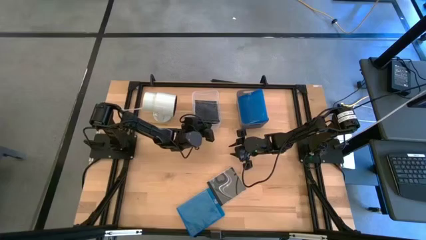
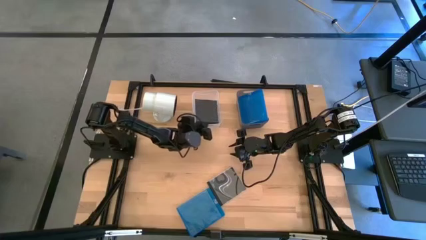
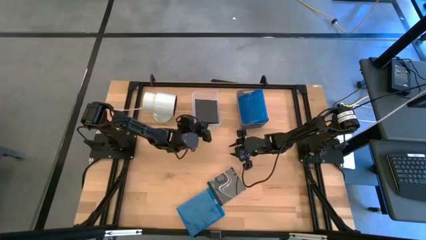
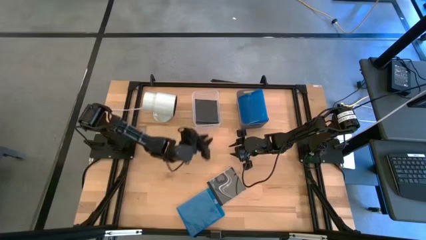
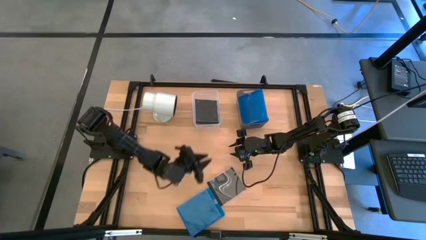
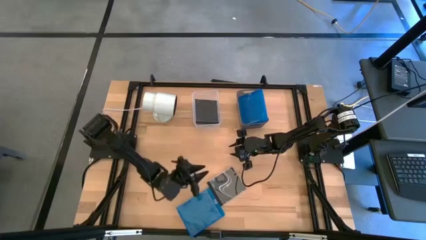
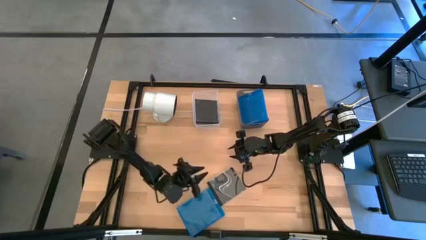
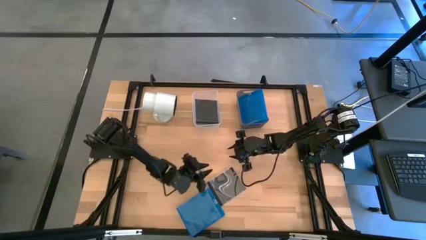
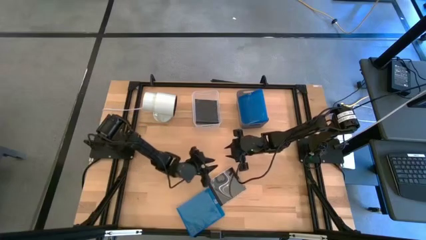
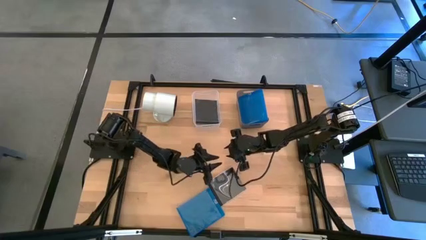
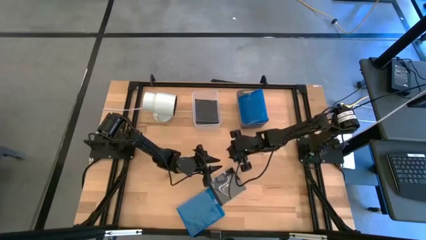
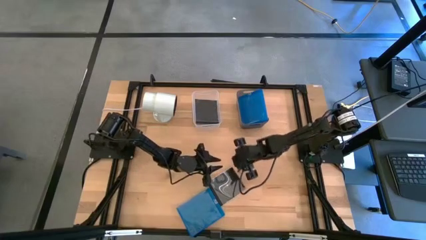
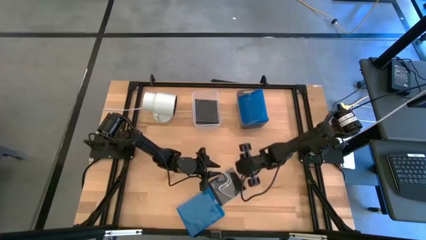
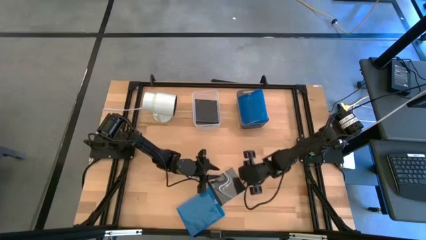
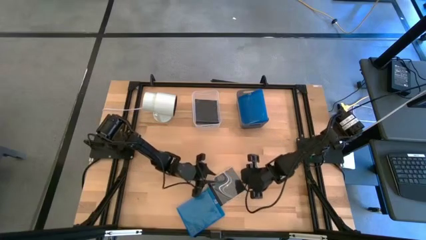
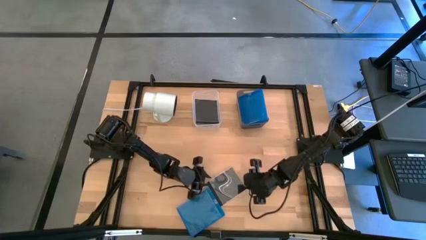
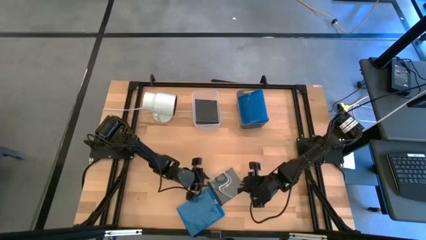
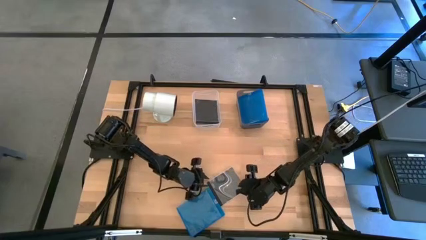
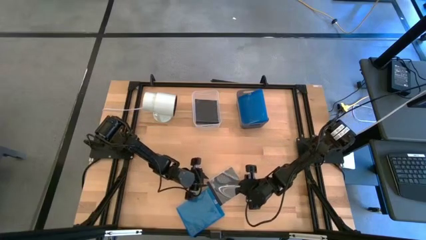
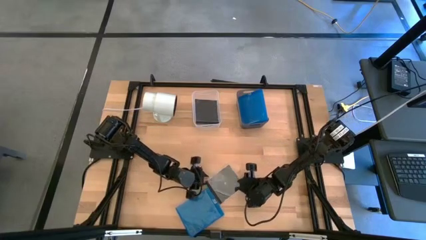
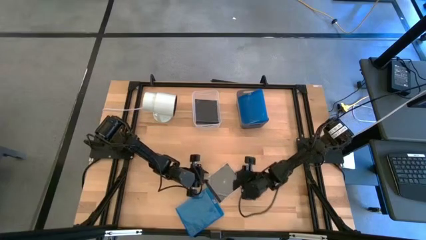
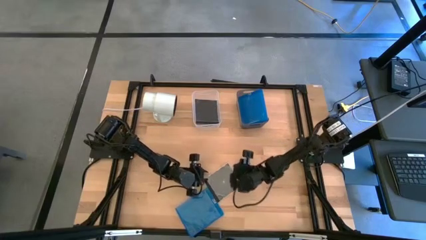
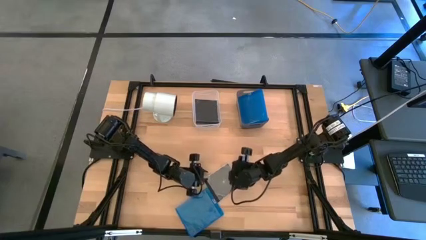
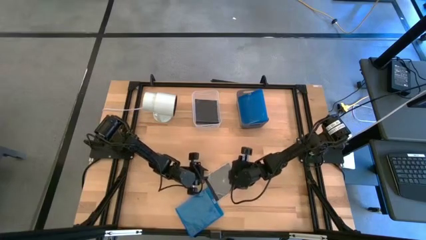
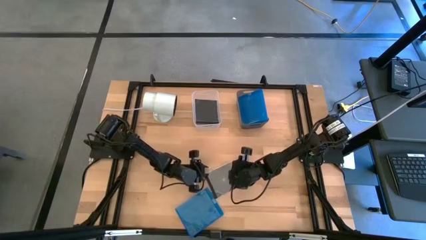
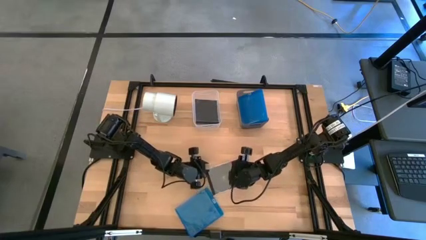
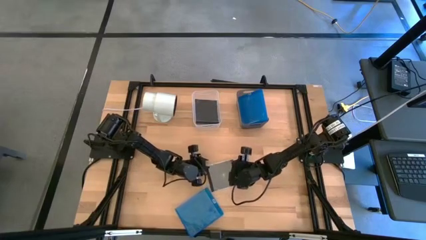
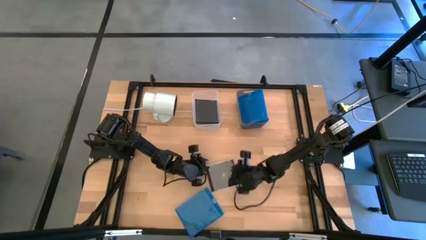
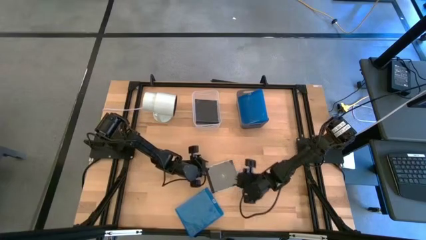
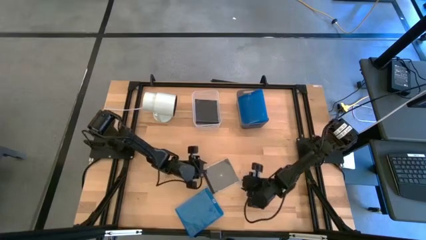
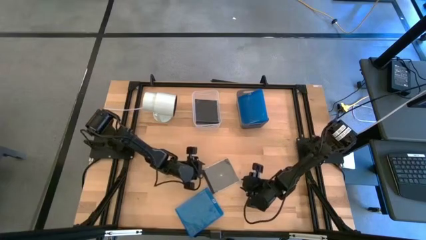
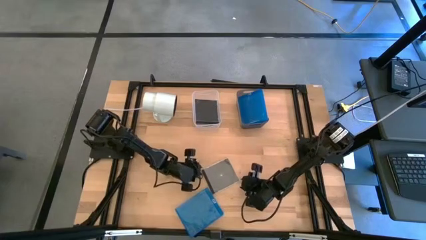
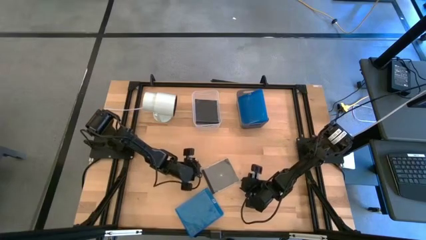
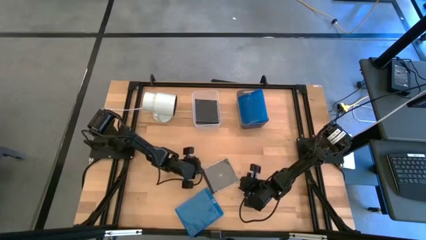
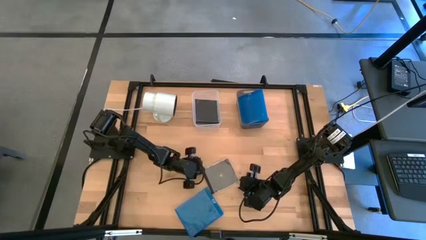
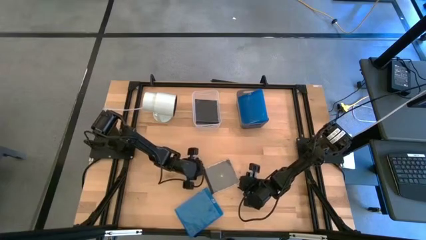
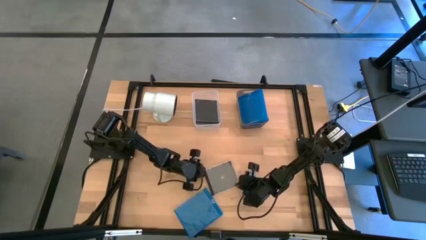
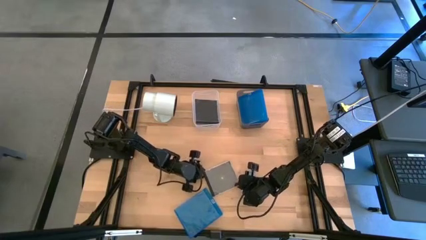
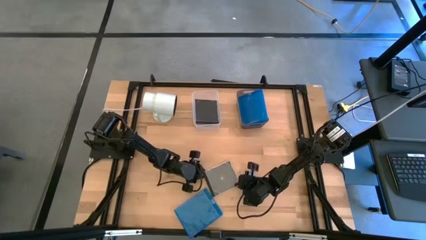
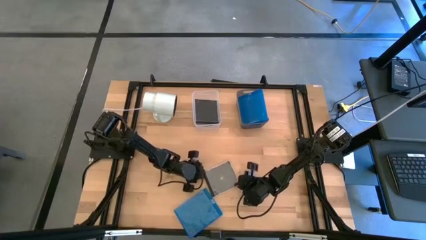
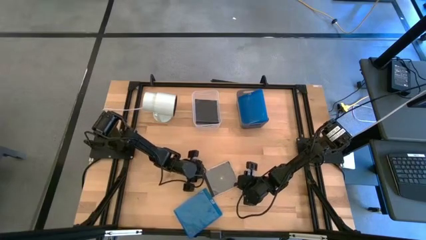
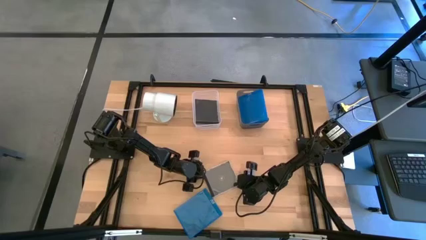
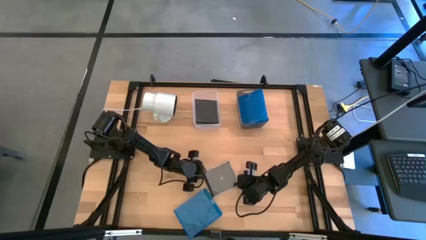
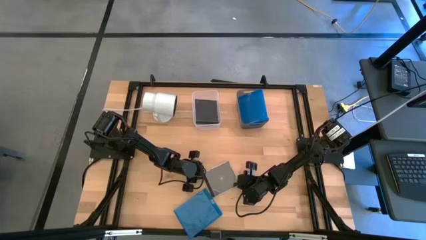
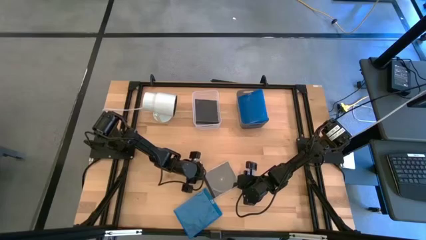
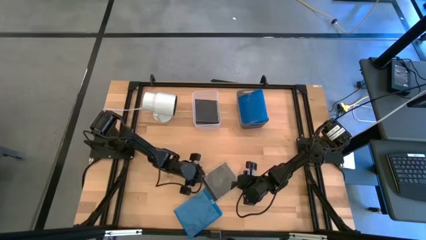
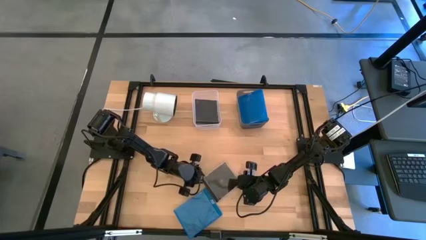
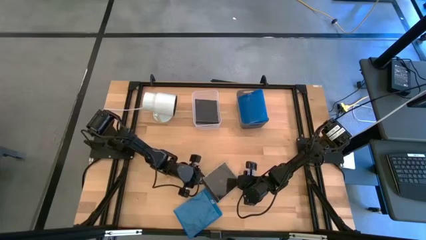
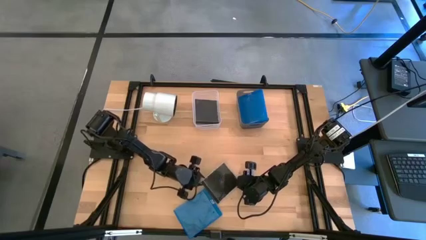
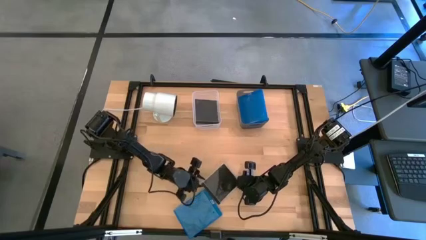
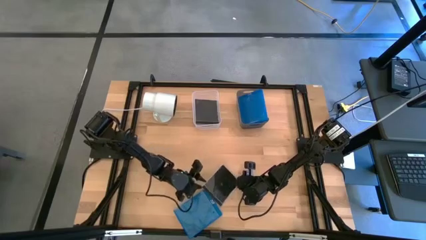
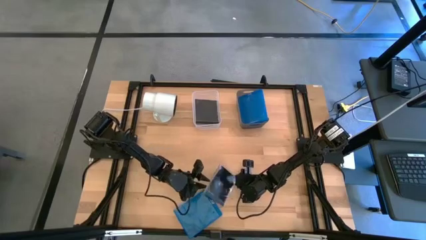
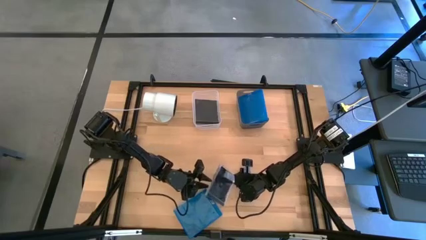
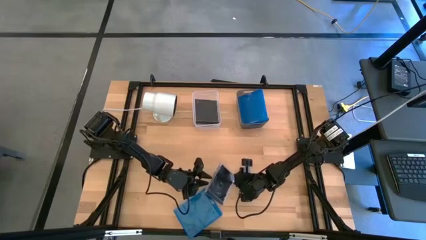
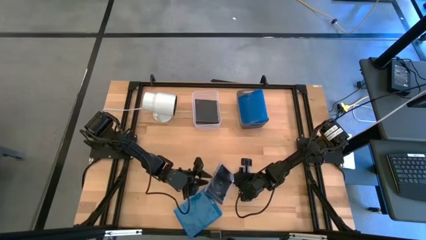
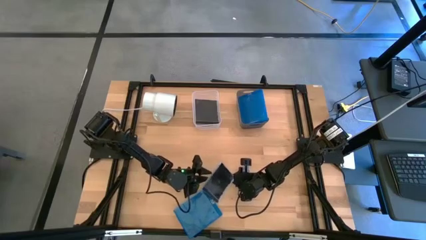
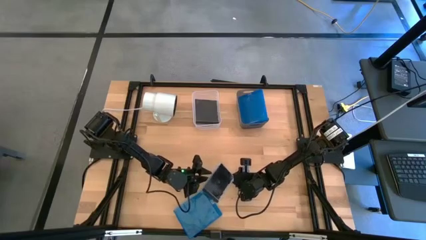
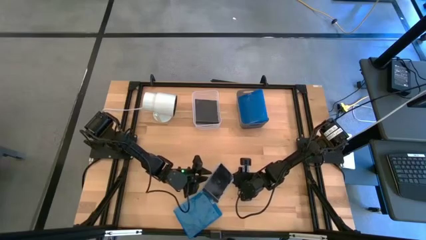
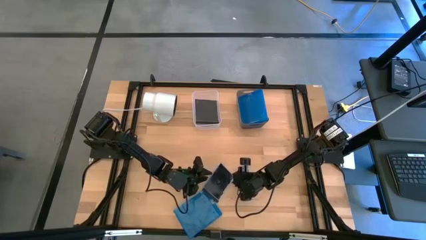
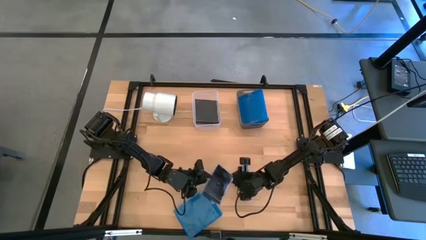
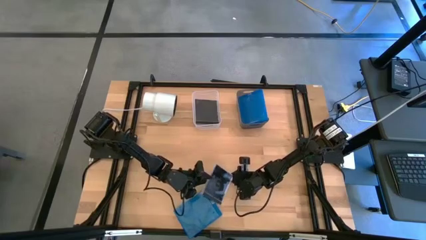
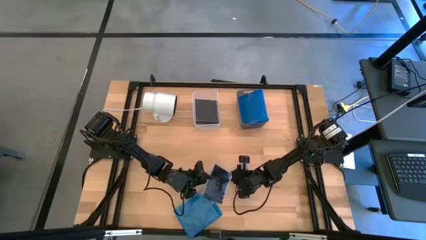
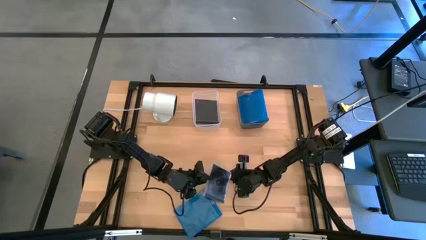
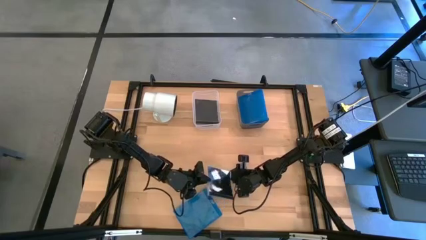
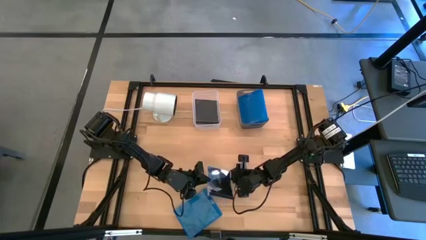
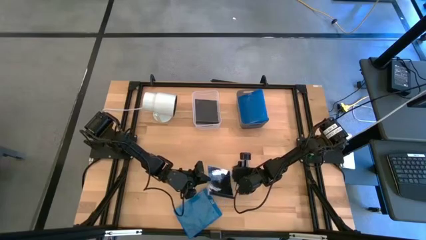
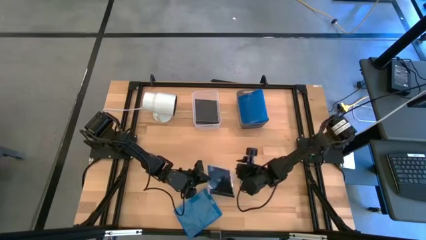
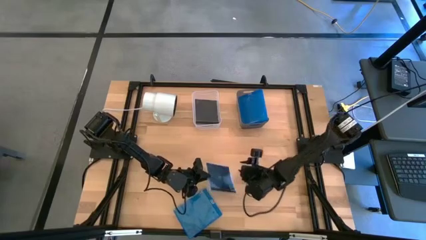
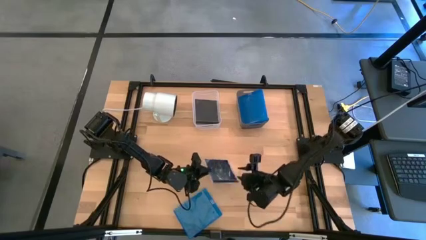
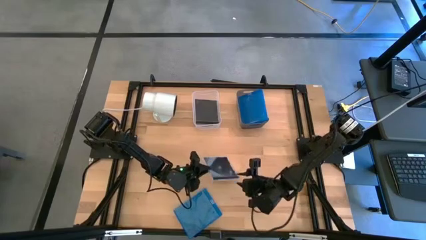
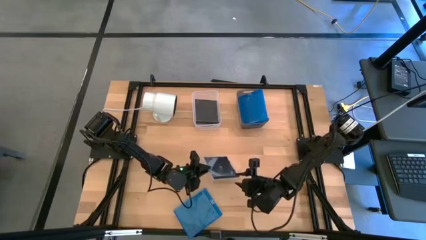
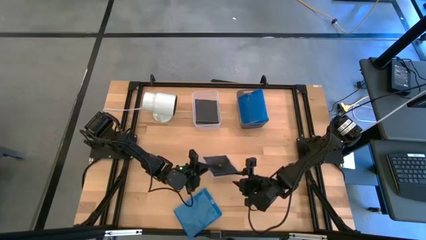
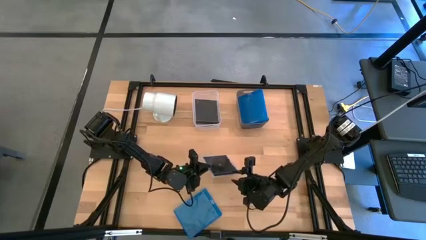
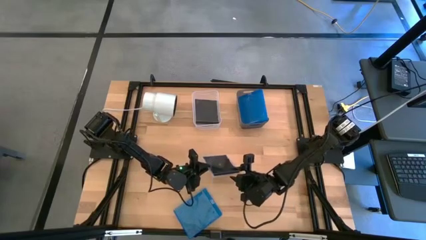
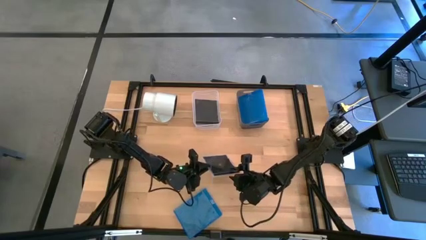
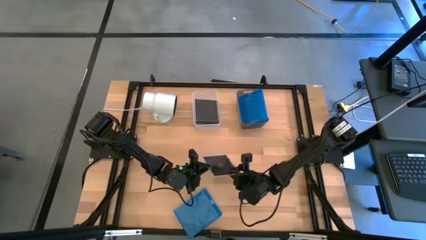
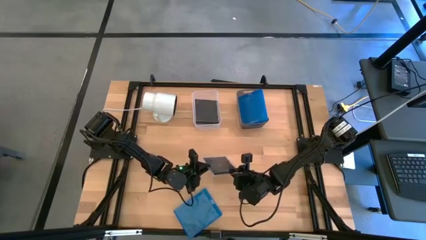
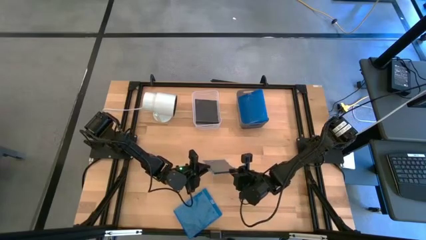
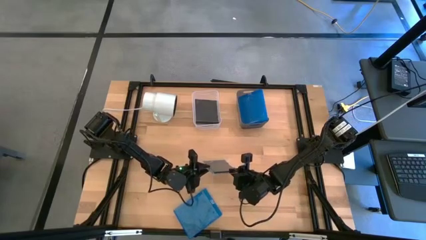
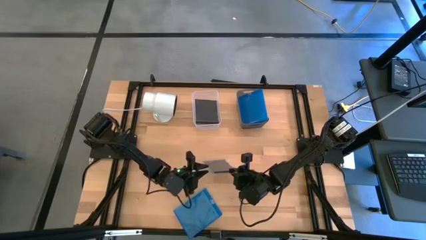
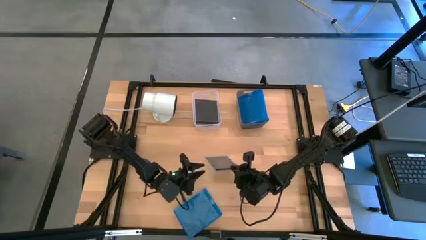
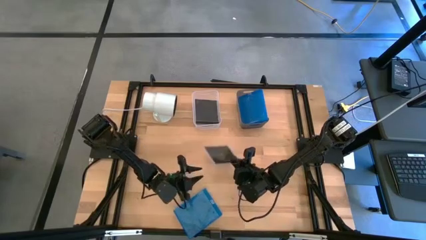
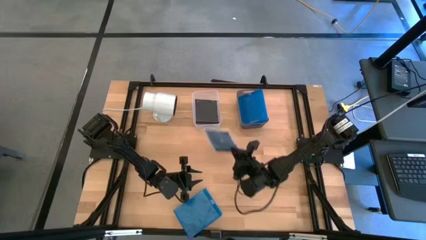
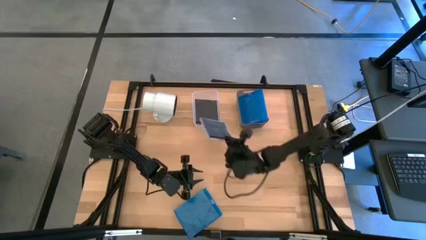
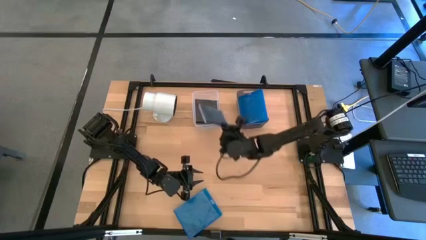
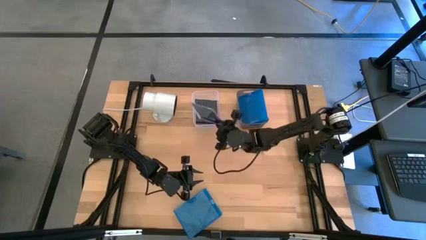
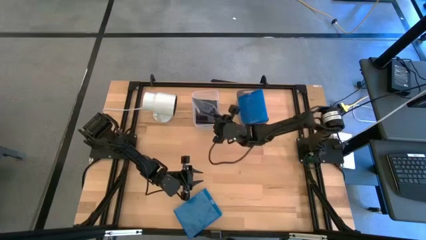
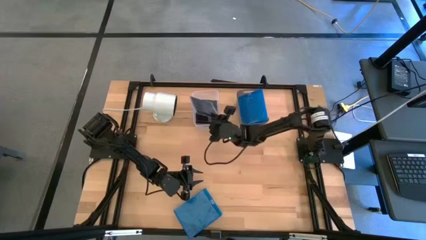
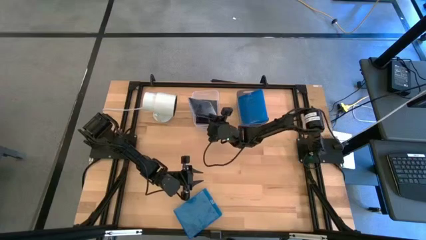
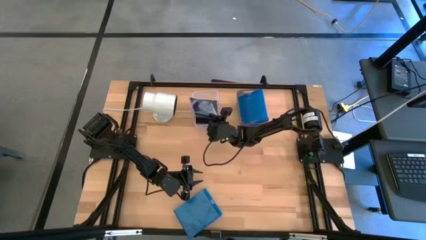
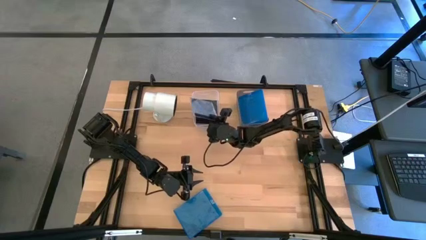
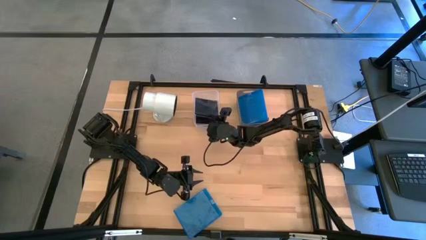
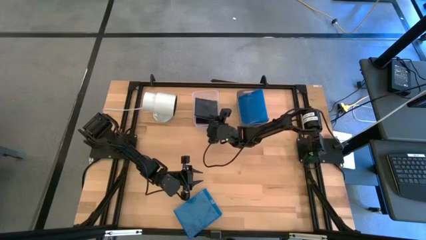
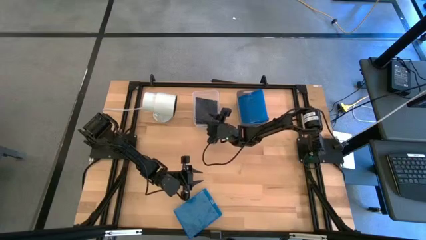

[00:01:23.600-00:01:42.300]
Task: Pick & place jewel cases by type
Put the black cd case into the white bin
